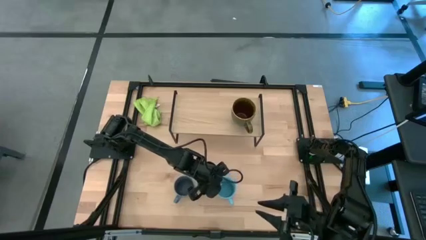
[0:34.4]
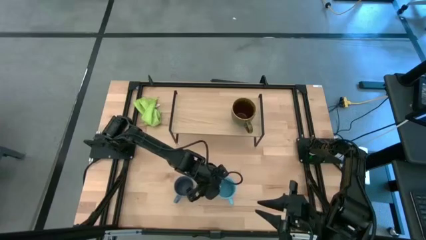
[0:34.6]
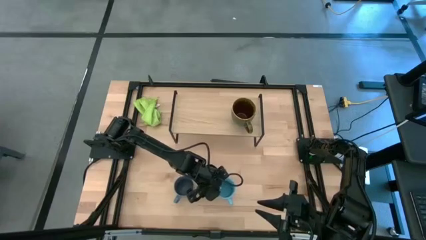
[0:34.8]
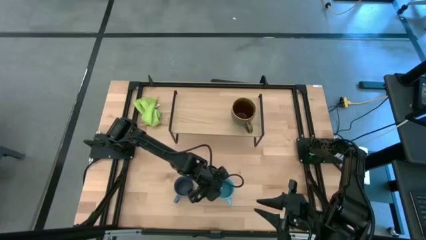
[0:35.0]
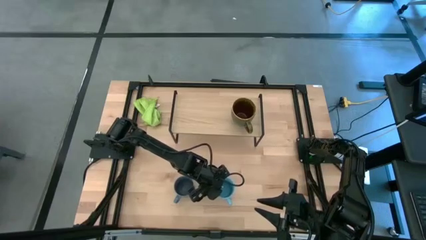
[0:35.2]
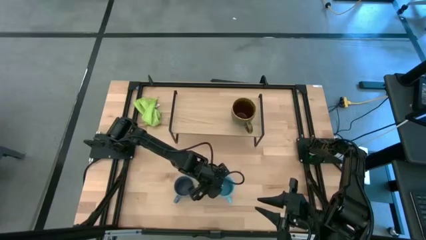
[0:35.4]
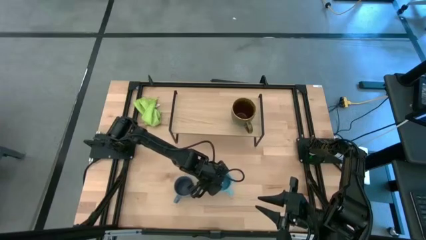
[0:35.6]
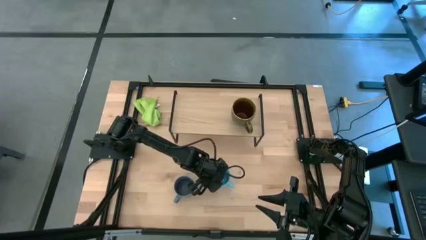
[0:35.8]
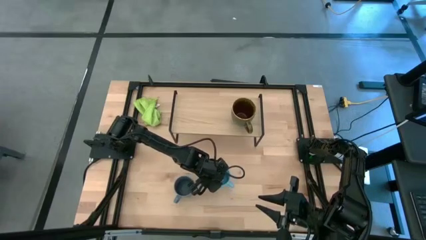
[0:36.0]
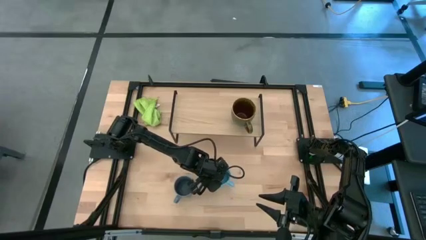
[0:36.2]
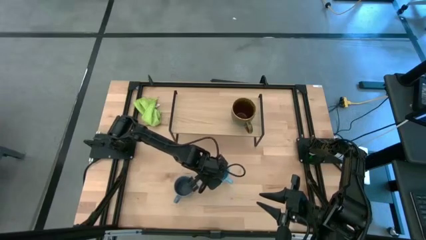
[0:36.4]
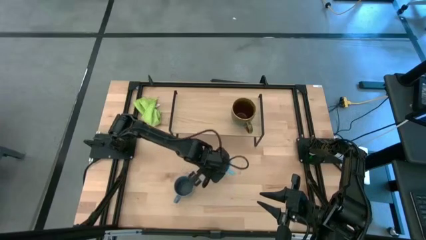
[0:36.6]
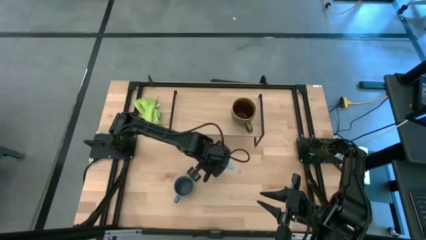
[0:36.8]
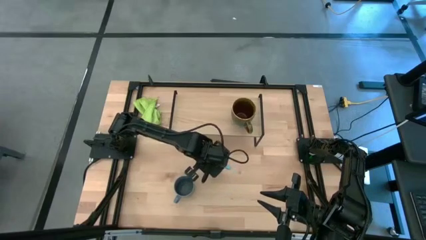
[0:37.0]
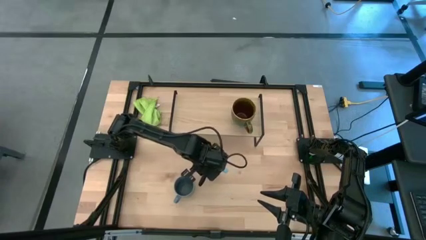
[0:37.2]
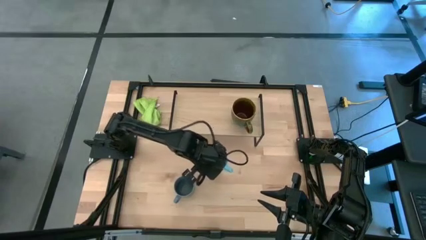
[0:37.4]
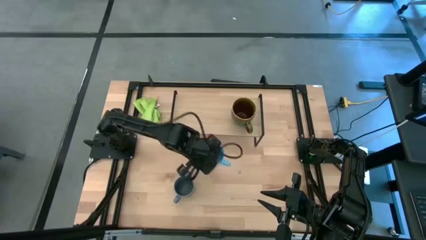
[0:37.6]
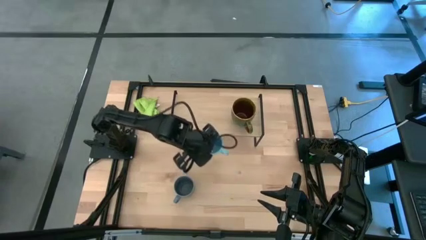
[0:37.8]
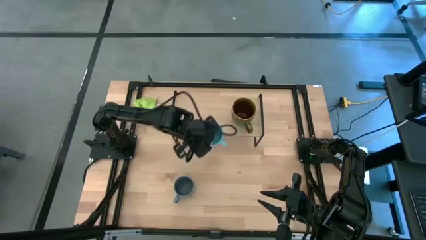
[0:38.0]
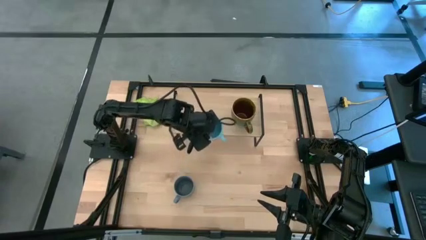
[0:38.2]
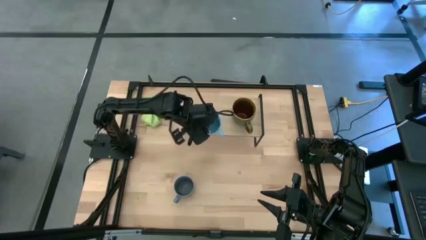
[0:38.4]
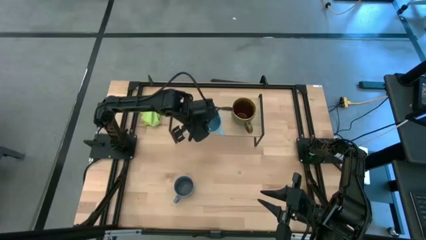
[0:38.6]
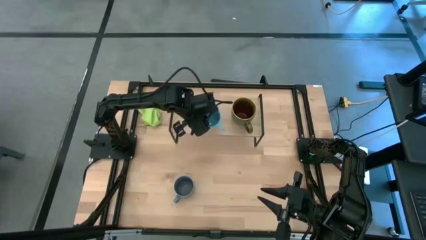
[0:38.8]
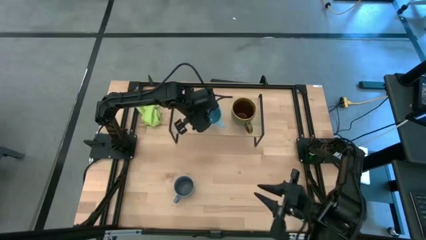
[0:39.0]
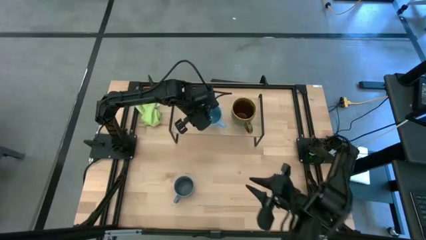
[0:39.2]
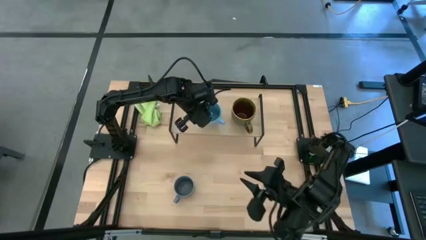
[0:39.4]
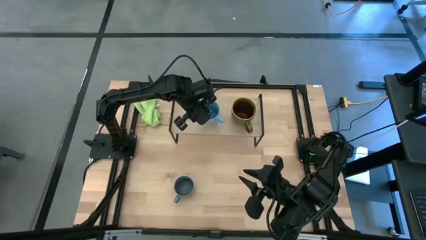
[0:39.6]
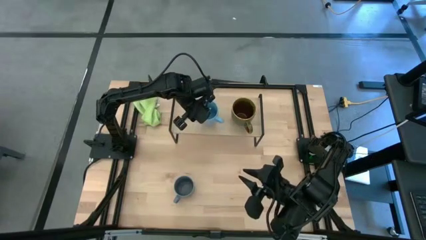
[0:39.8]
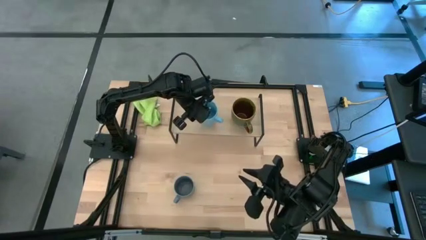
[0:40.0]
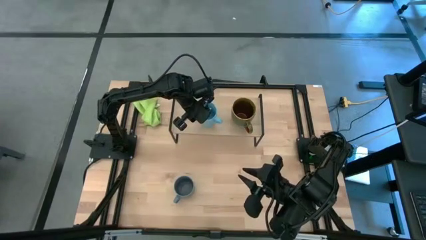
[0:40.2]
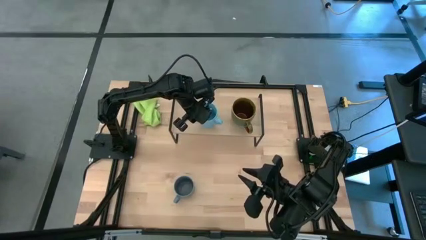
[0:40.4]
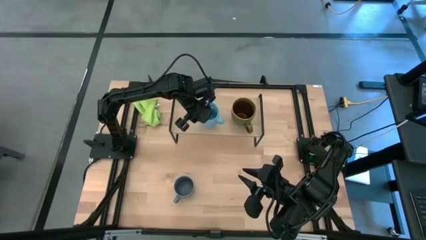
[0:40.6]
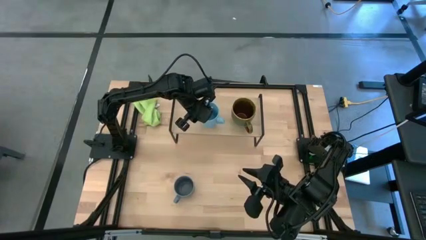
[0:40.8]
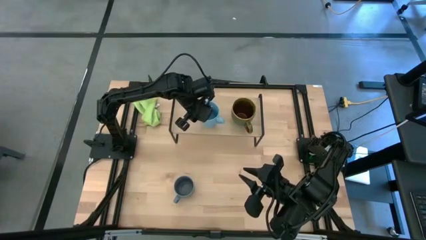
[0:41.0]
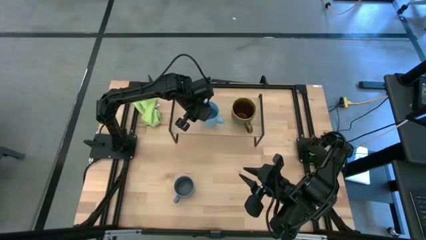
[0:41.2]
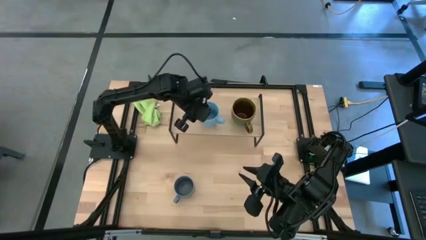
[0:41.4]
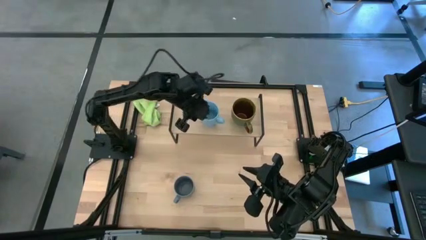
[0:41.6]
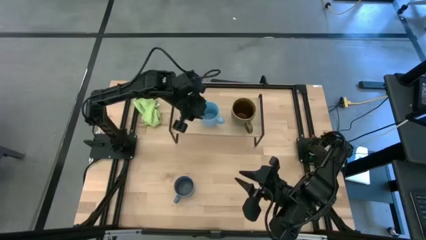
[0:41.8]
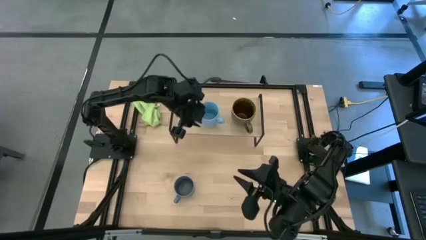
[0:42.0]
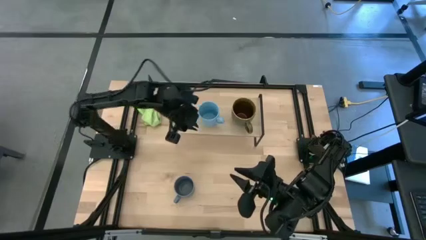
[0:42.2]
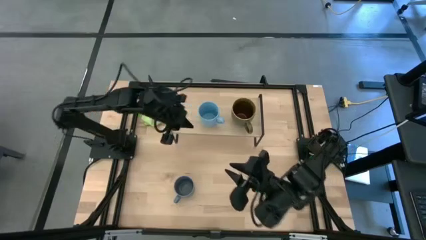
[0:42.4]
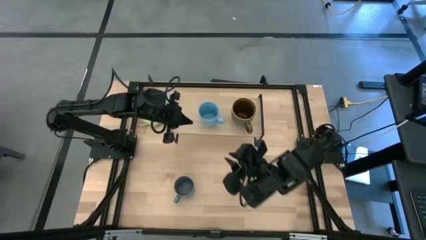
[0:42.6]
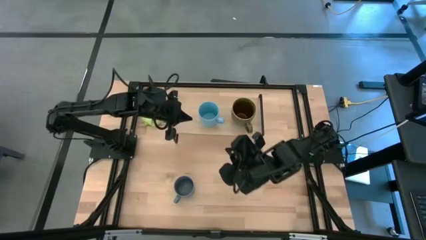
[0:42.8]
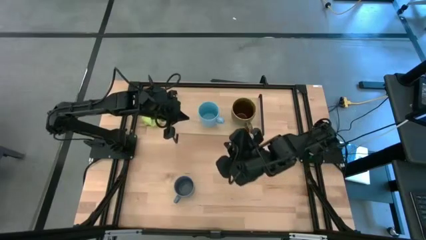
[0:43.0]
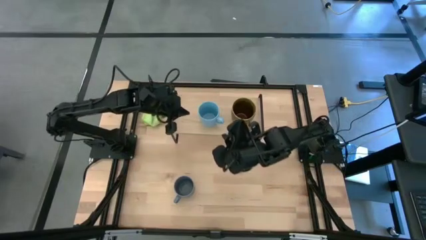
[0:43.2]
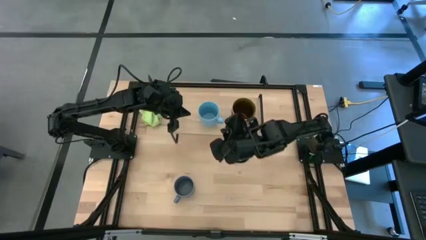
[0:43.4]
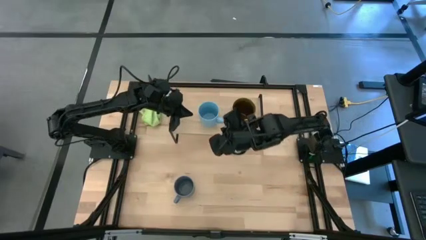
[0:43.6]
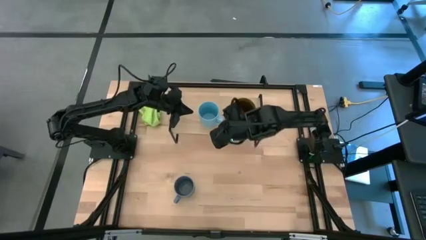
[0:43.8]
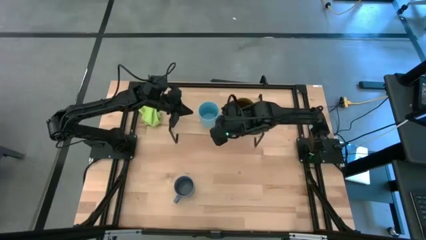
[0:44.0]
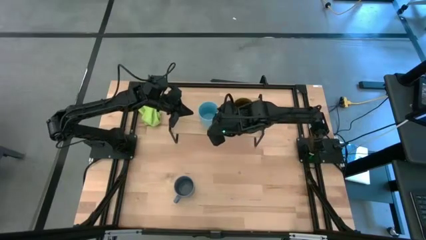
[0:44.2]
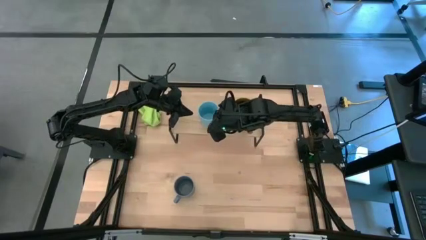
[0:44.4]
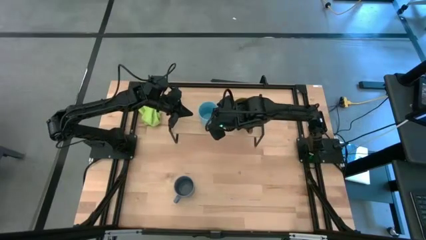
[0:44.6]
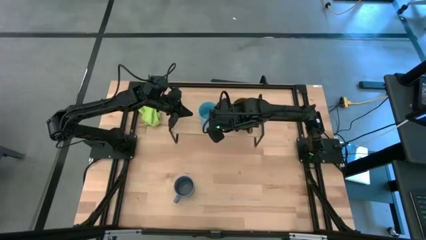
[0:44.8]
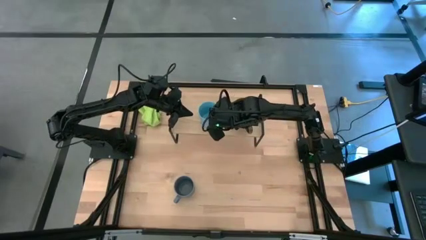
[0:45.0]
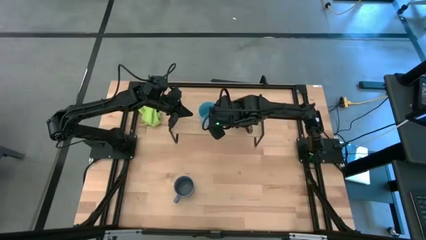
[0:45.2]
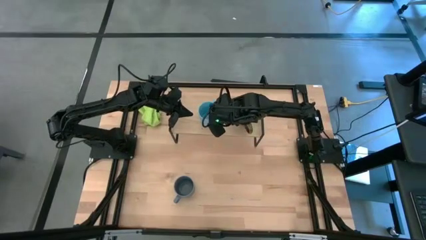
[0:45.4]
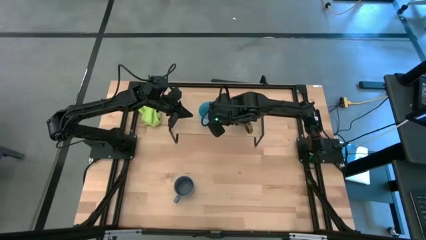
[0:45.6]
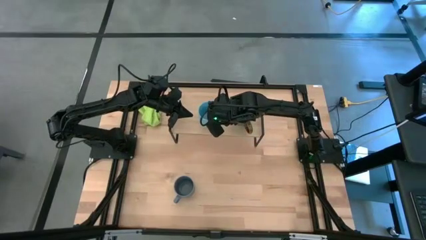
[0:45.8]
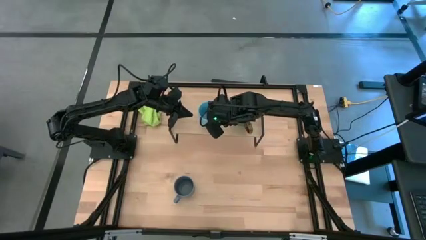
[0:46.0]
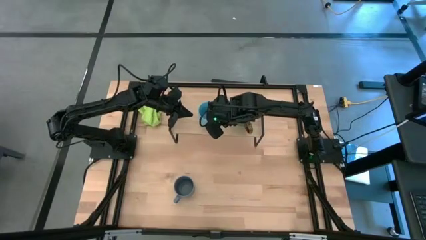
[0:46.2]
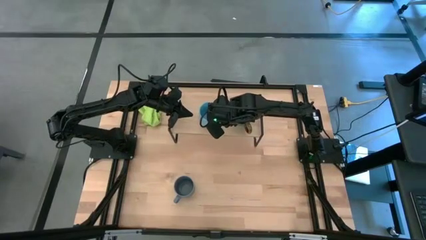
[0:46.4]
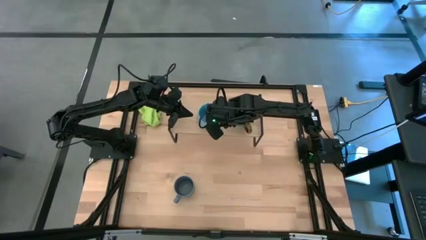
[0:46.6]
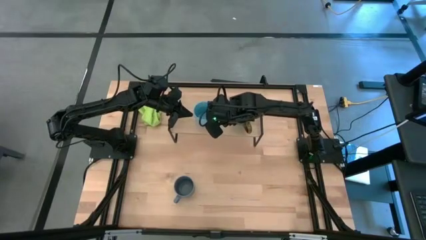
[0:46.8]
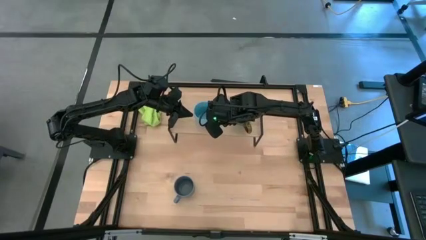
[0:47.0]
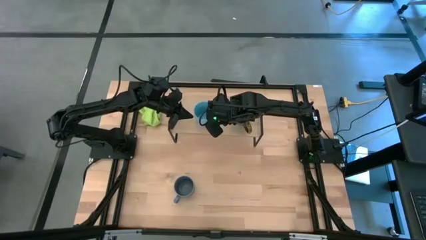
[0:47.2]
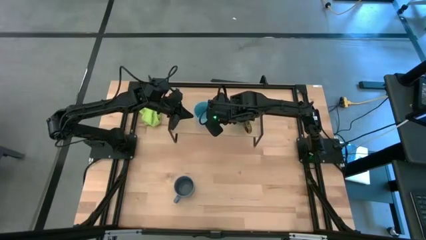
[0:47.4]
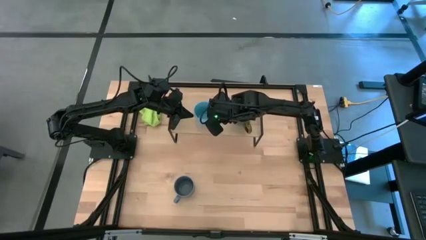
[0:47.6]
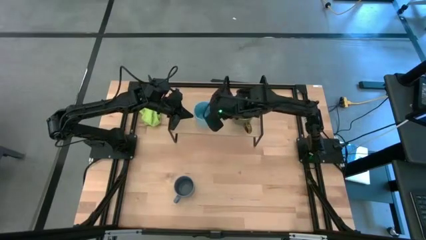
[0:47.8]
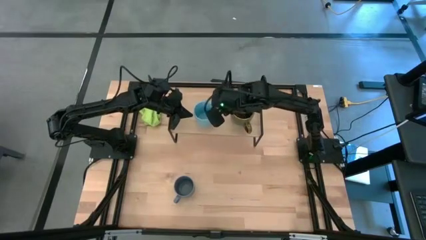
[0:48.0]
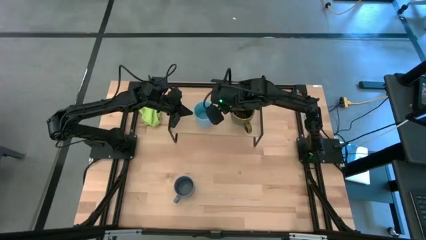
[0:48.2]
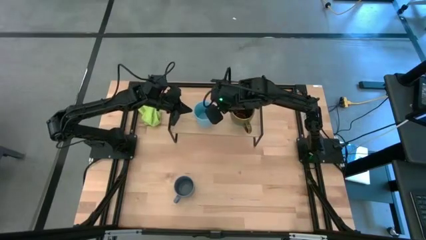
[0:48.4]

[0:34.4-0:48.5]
Task: Stack small to large cups/mugs on shelf
Put the blue mug on the shelf
